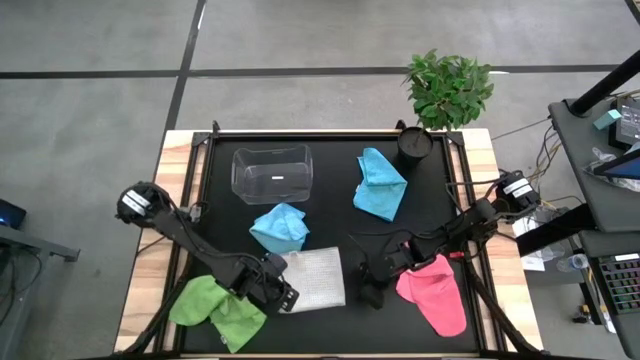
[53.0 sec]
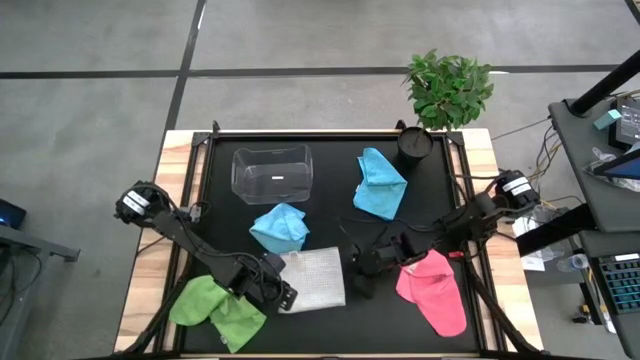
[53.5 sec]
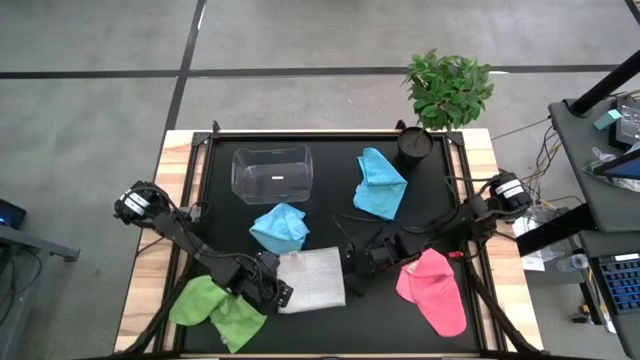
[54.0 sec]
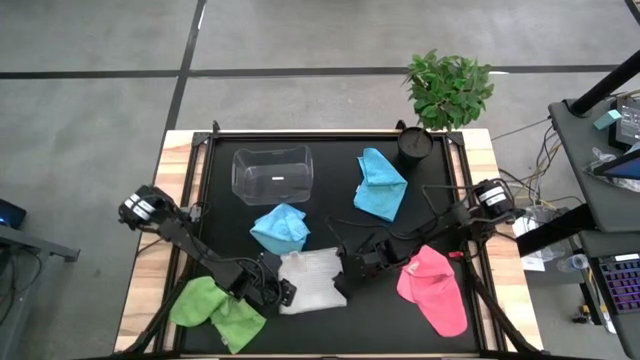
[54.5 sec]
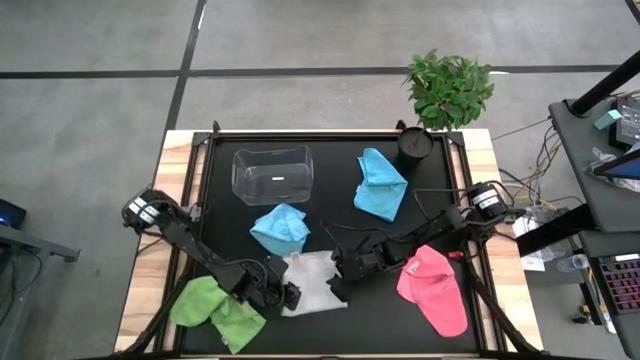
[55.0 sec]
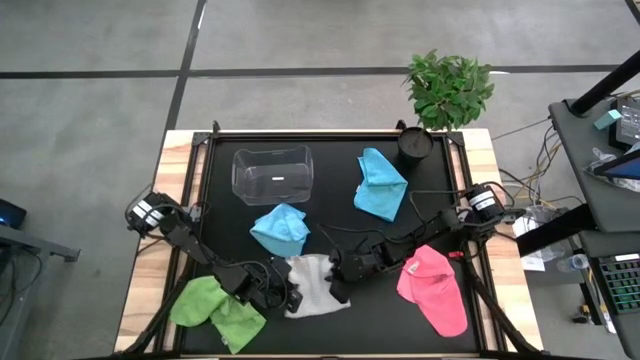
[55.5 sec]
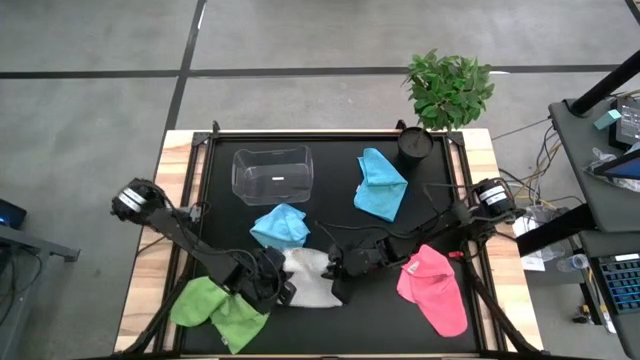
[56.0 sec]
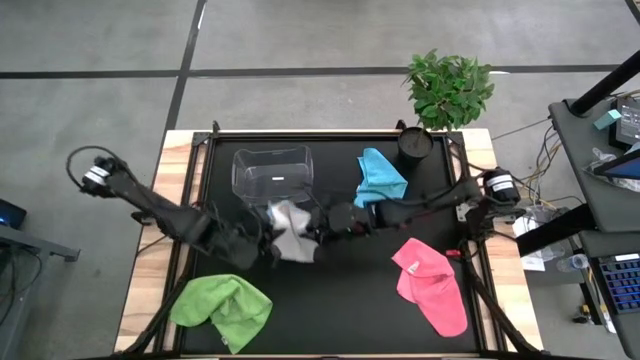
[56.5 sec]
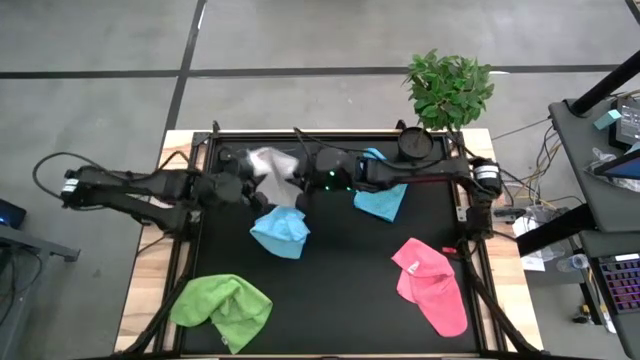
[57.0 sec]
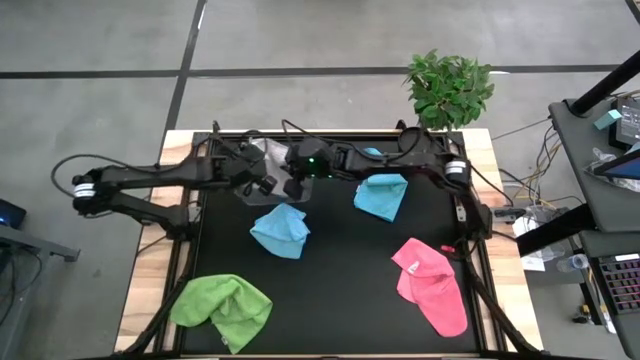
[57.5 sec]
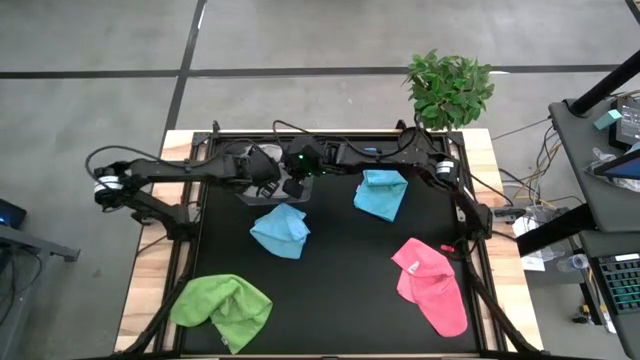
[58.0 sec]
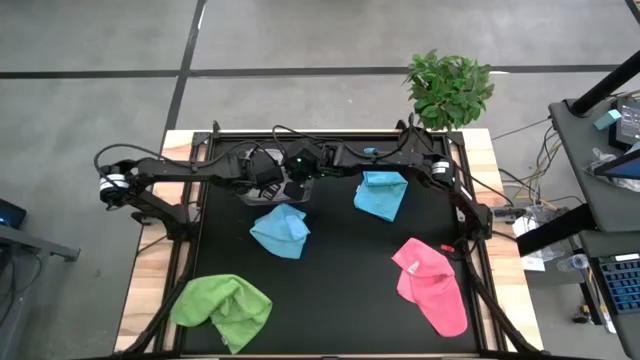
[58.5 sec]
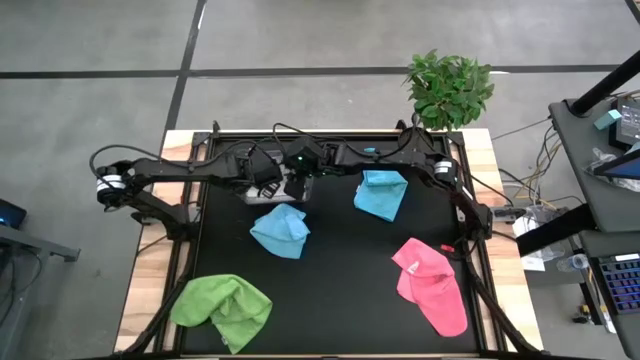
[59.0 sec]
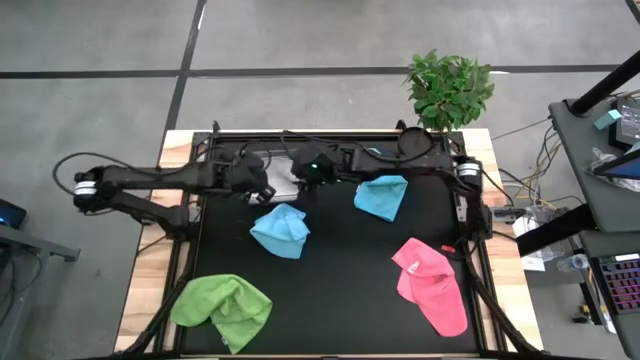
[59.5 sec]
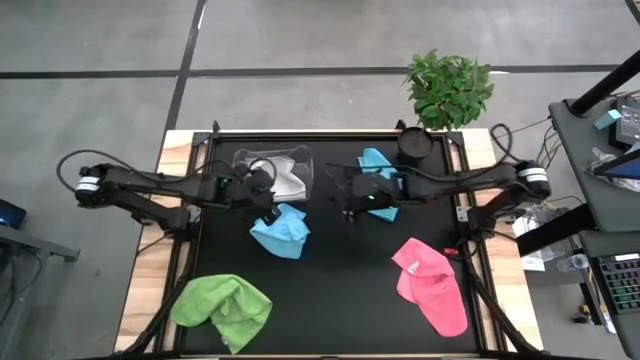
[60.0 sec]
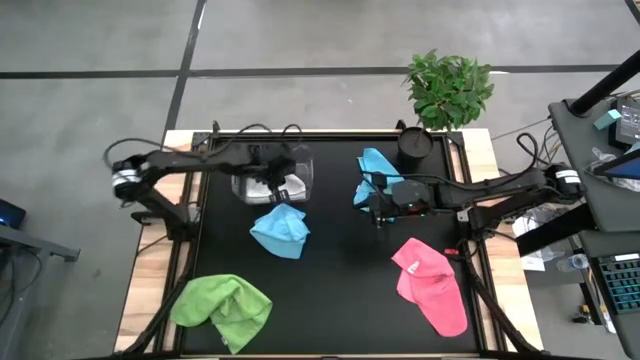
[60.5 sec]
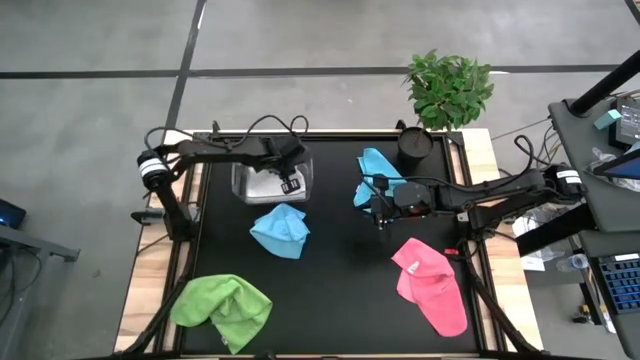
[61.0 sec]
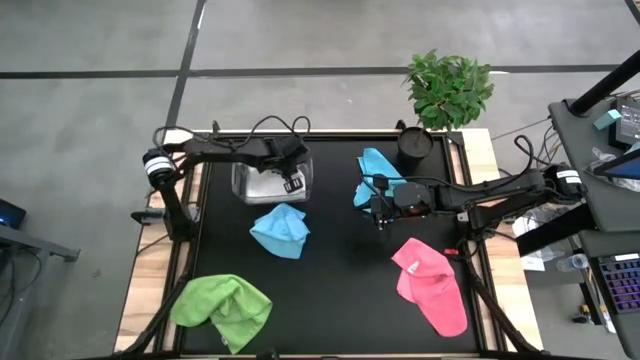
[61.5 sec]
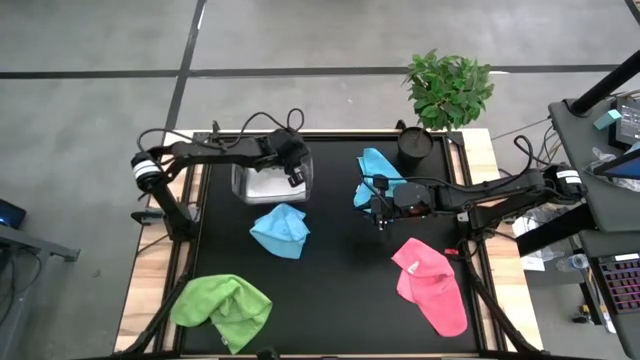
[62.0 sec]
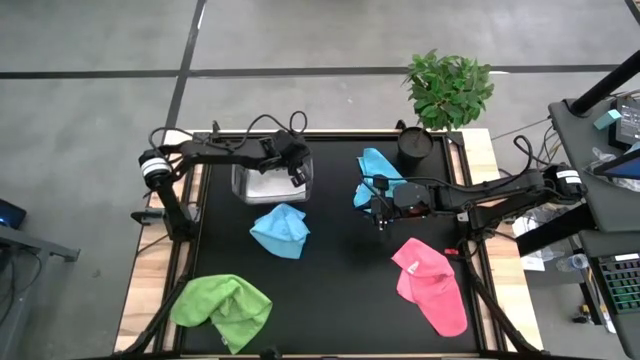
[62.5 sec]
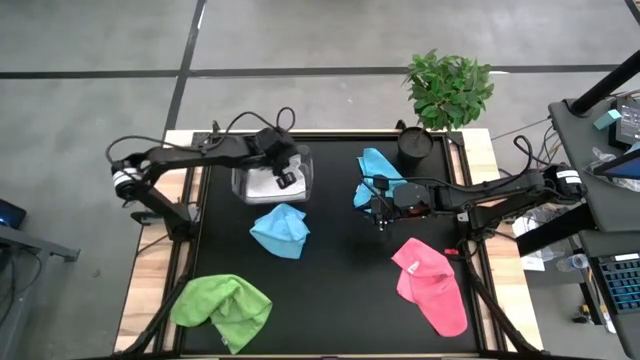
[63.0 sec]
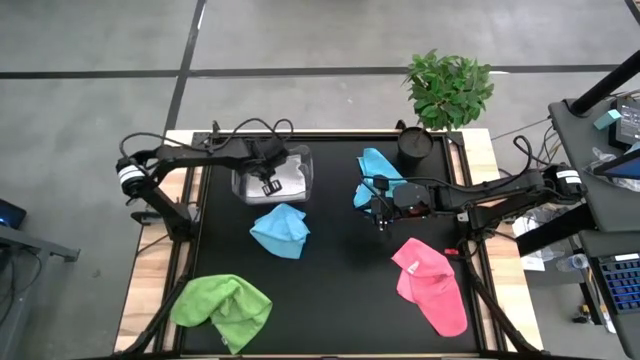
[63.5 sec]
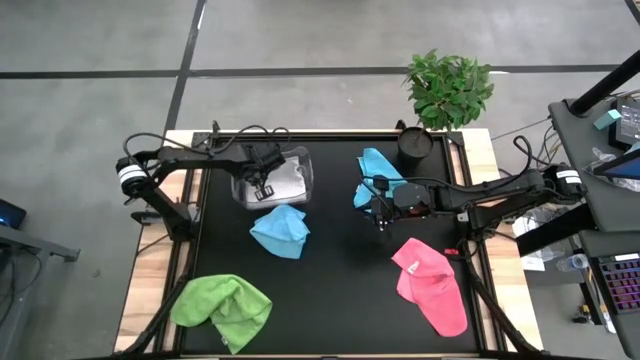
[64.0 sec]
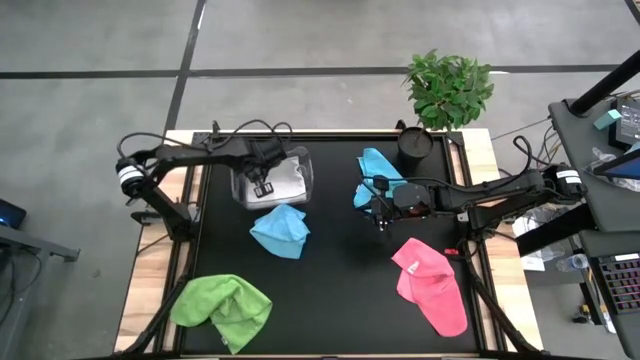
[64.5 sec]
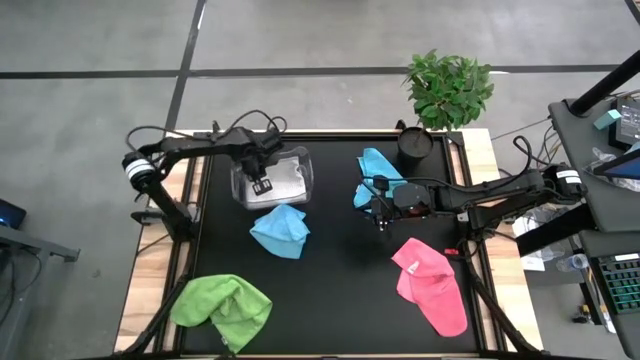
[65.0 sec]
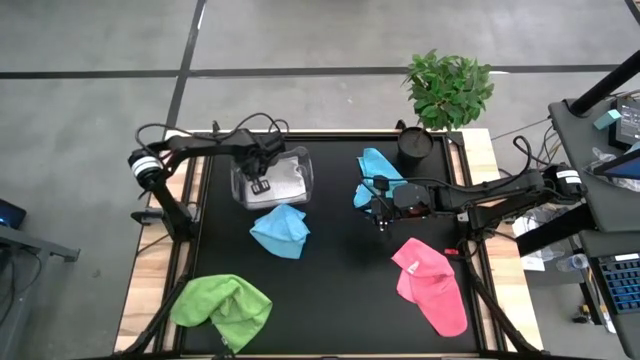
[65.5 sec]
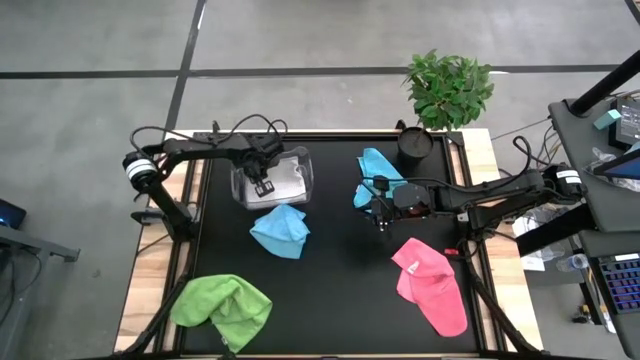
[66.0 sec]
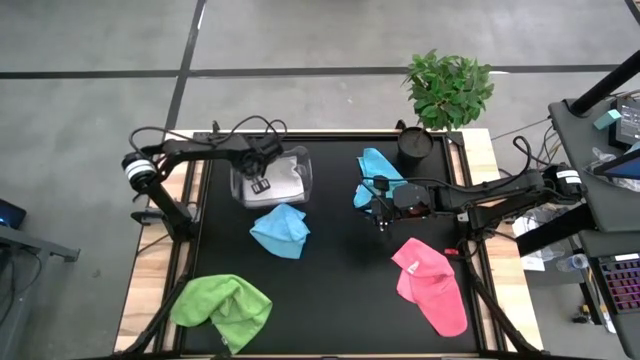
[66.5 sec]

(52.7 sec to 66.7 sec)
Task: Fold microfiber towels
Put the gray microfiber cloth into the transparent bin

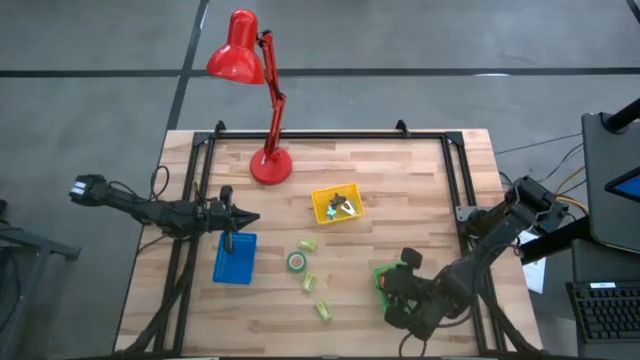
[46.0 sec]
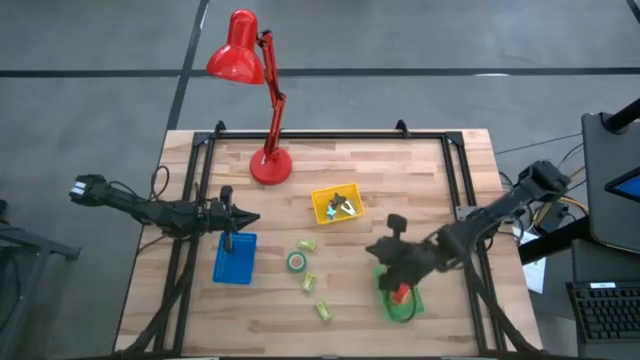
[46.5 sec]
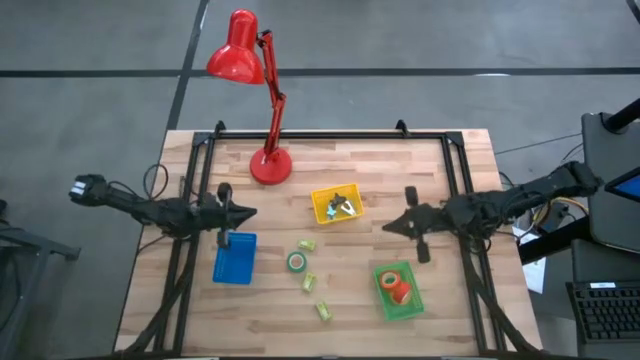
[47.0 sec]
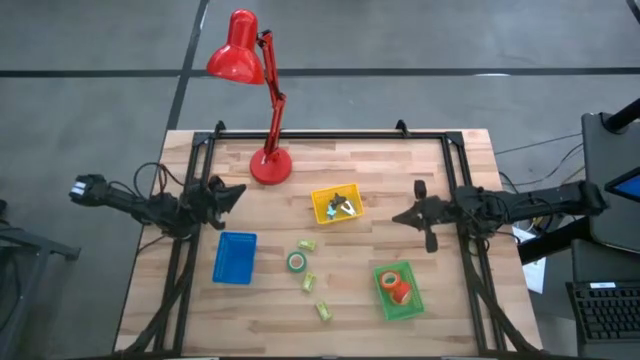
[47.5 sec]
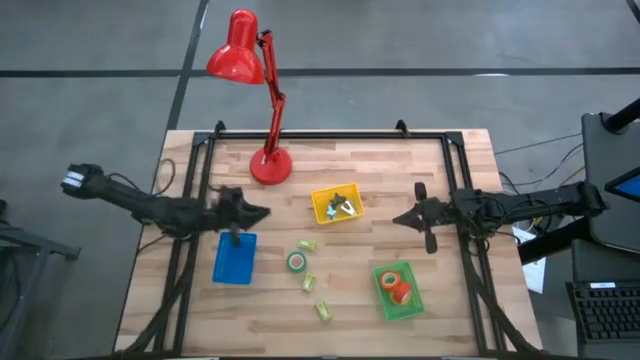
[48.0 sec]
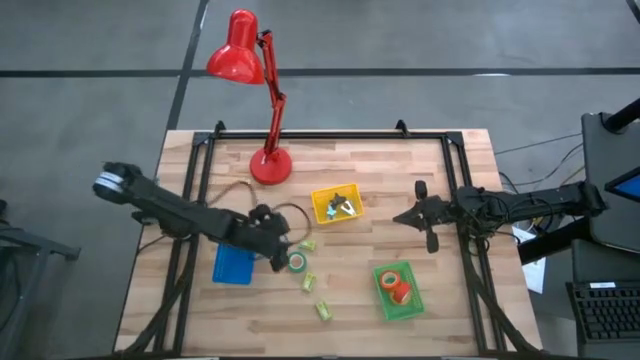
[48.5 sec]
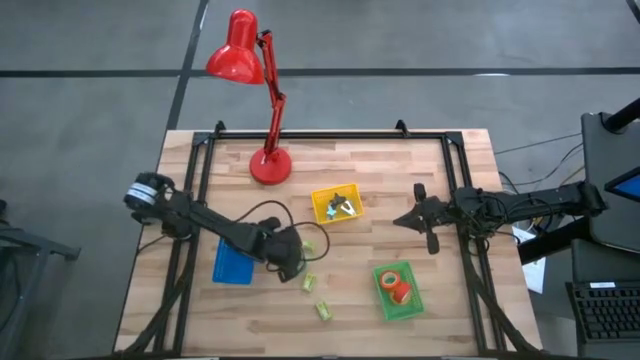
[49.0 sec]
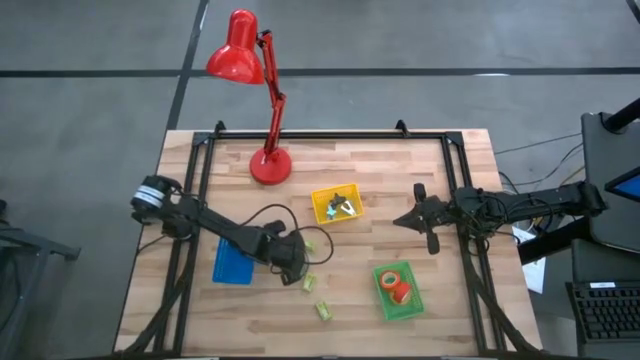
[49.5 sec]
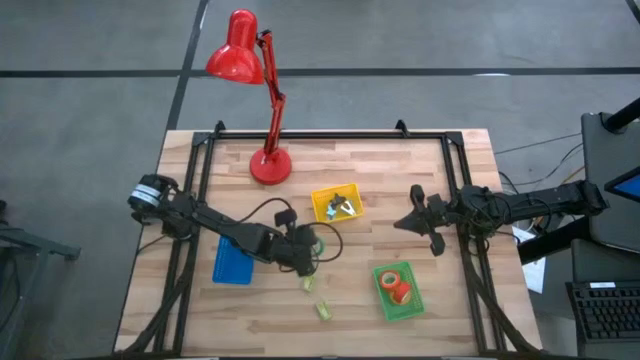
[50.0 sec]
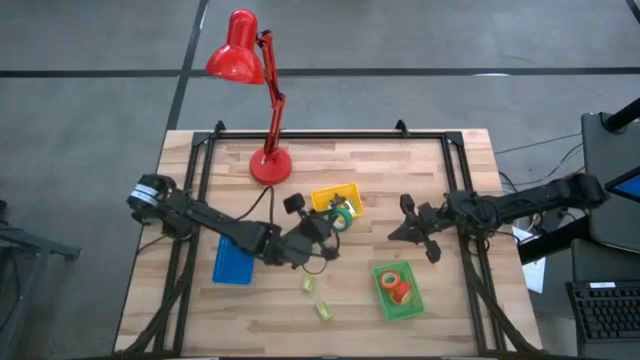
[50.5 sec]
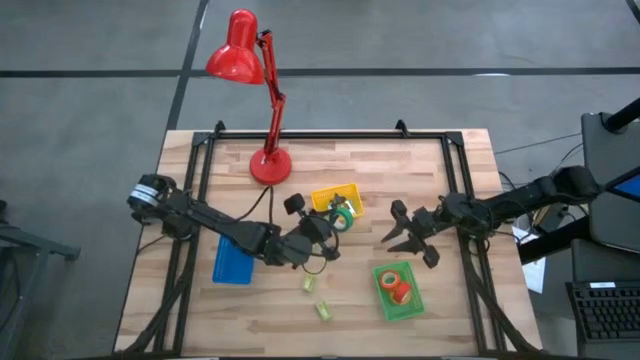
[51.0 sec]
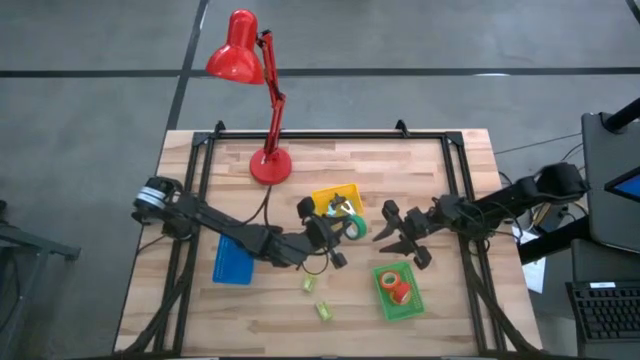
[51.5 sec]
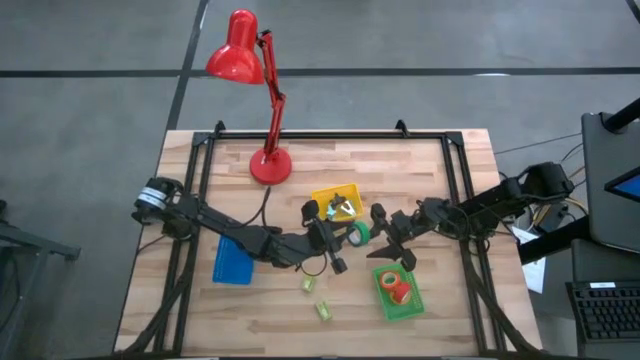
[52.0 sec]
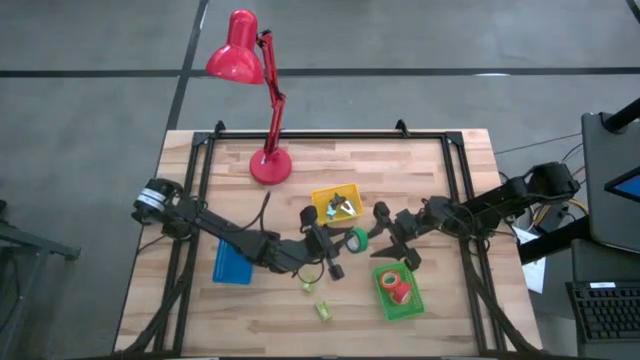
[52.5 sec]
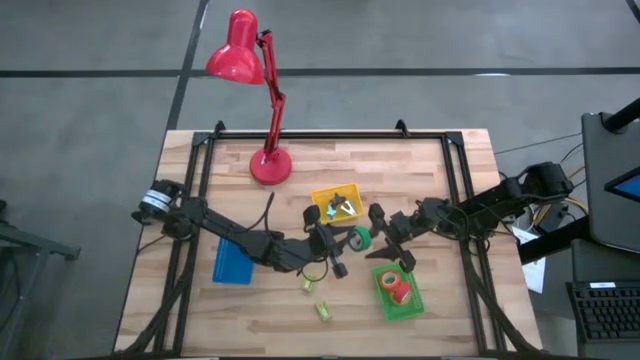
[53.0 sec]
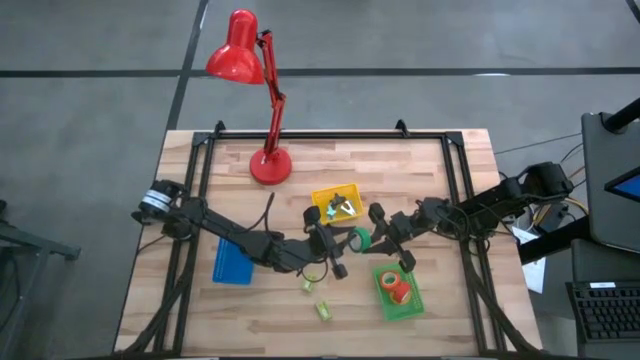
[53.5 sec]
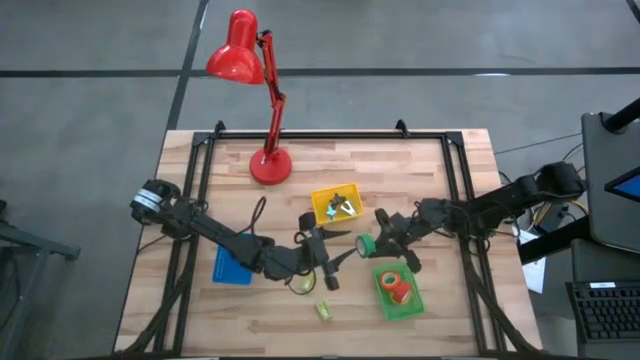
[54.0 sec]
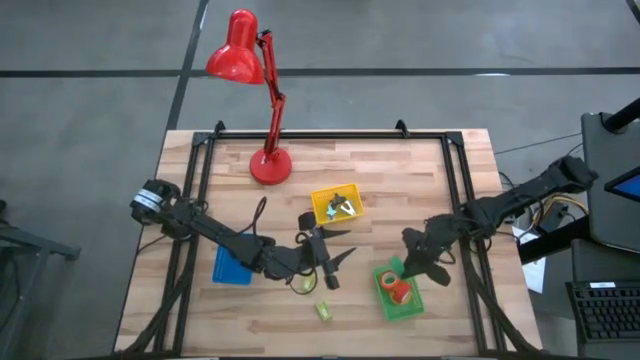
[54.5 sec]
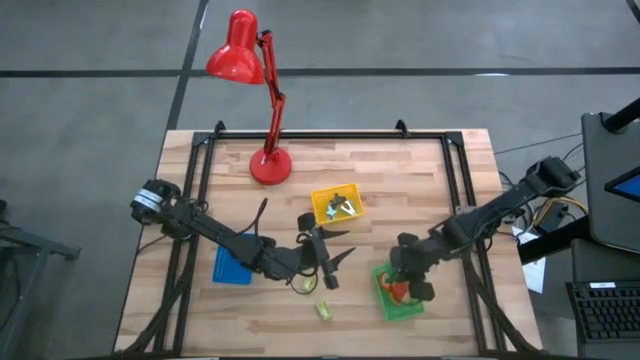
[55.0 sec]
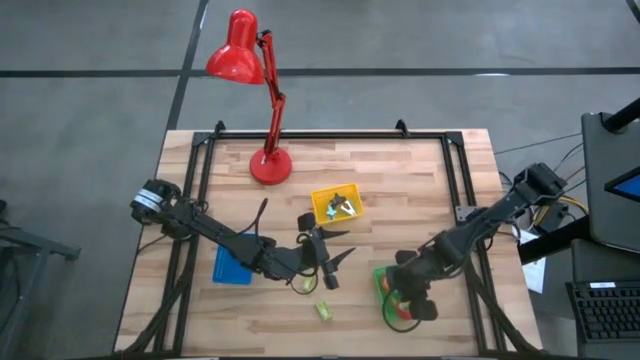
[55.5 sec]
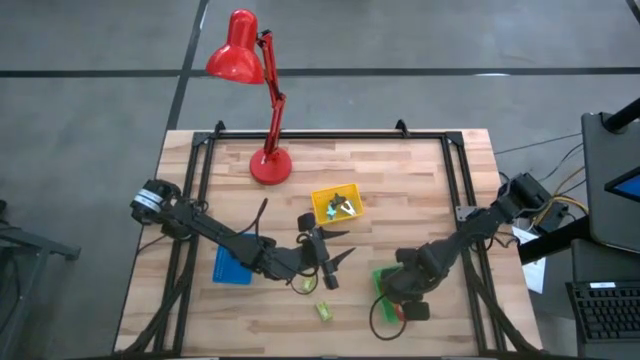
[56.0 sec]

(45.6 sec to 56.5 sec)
Task: Pick and place Stapler, Stapler remover, tape
Put the green tape into the green bin
